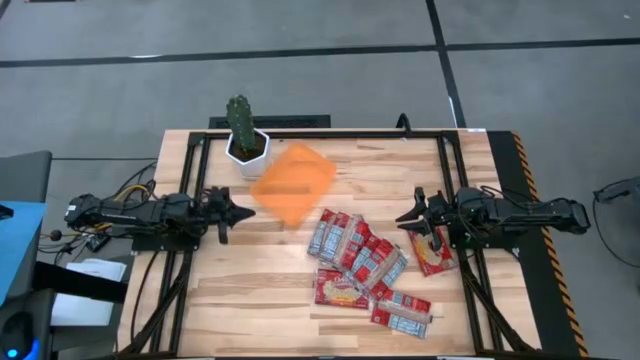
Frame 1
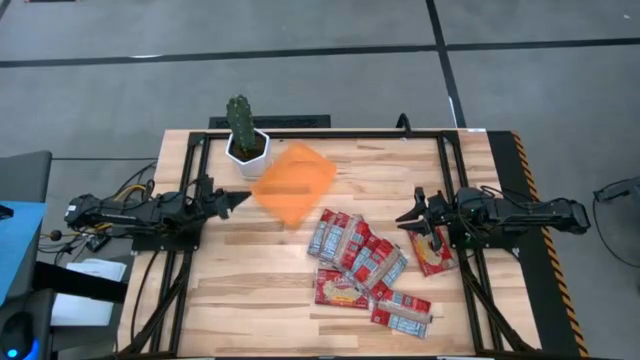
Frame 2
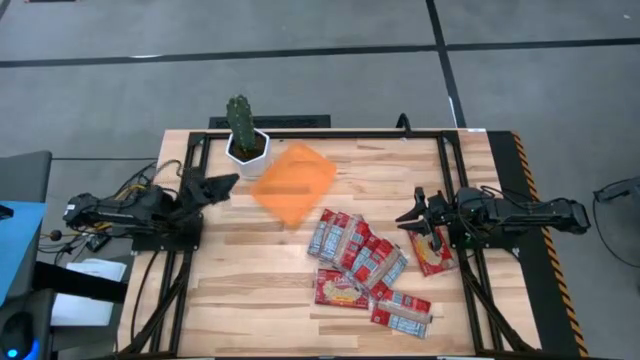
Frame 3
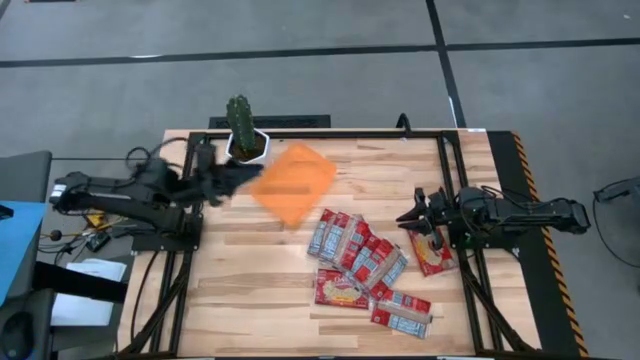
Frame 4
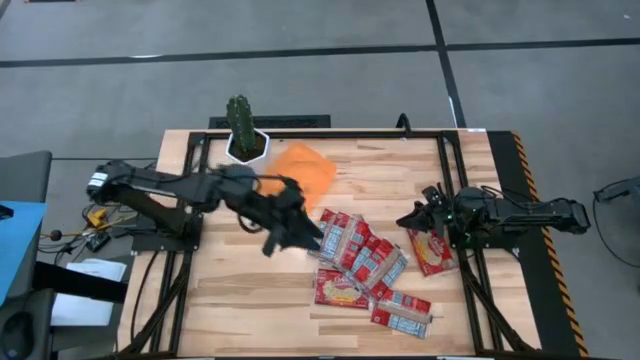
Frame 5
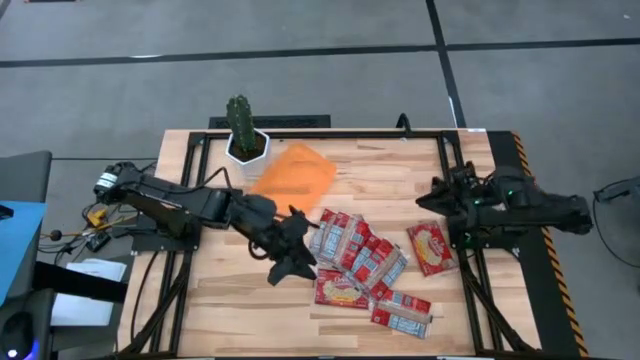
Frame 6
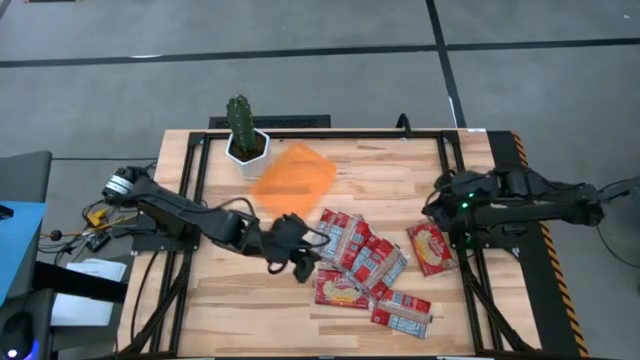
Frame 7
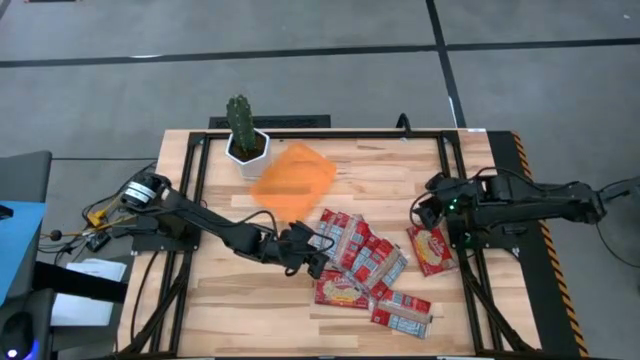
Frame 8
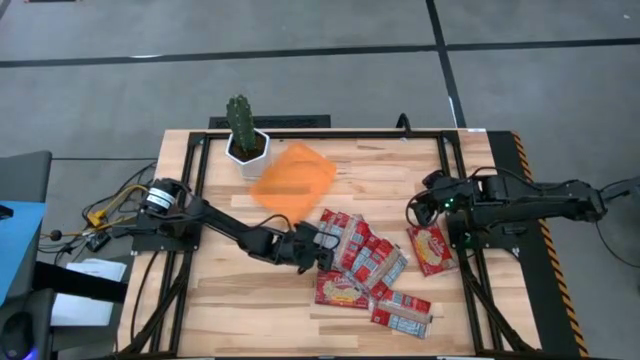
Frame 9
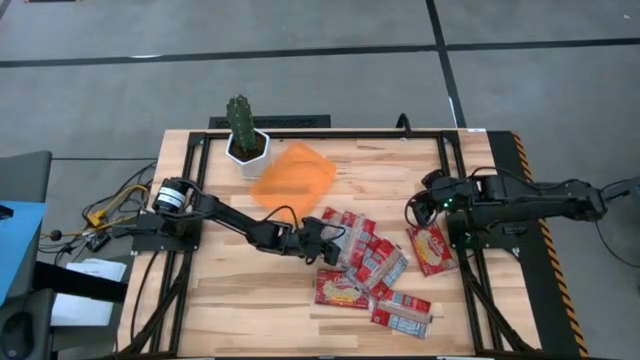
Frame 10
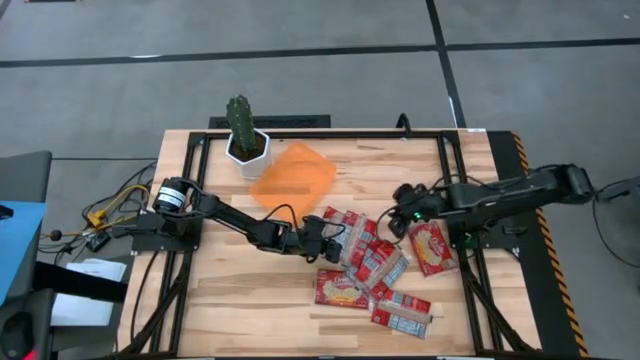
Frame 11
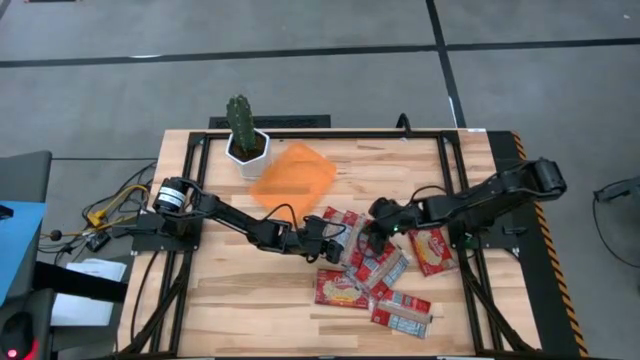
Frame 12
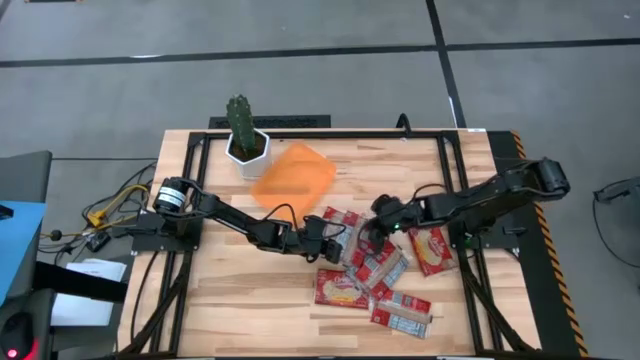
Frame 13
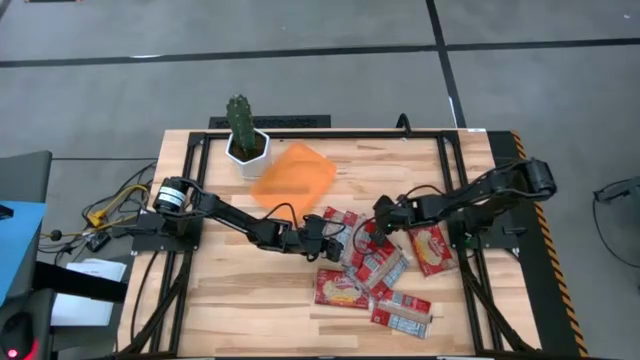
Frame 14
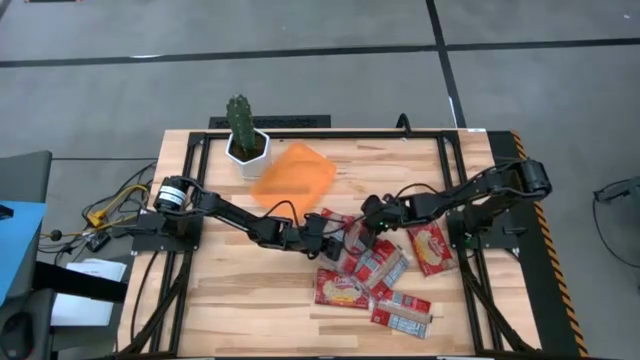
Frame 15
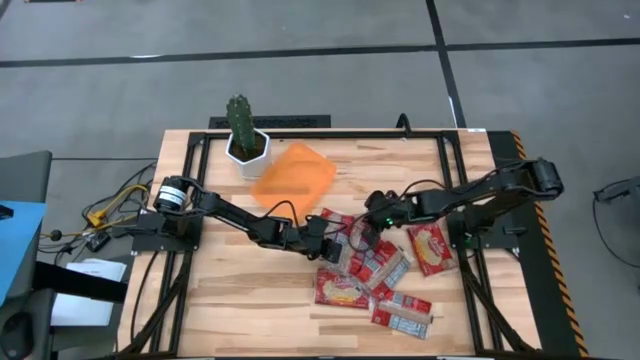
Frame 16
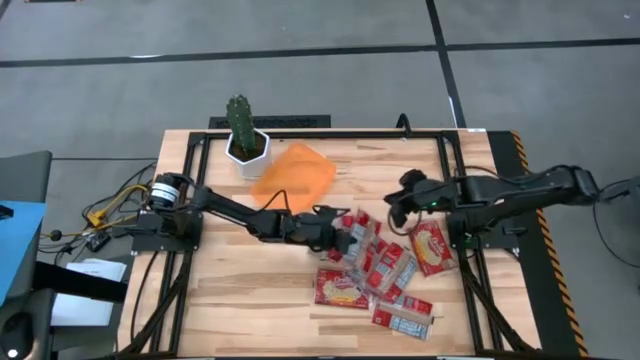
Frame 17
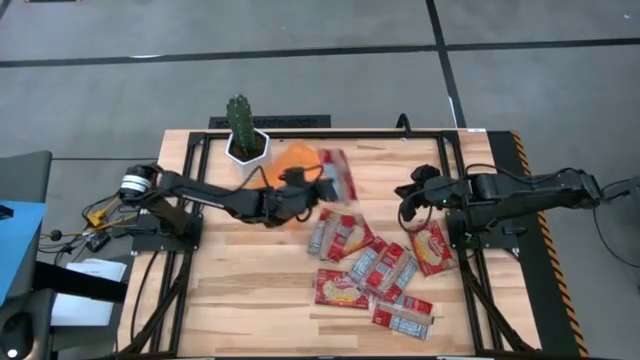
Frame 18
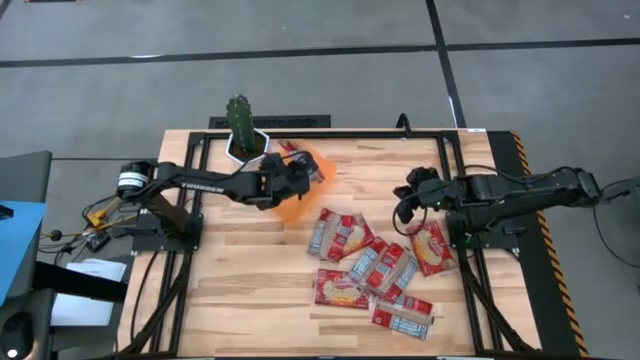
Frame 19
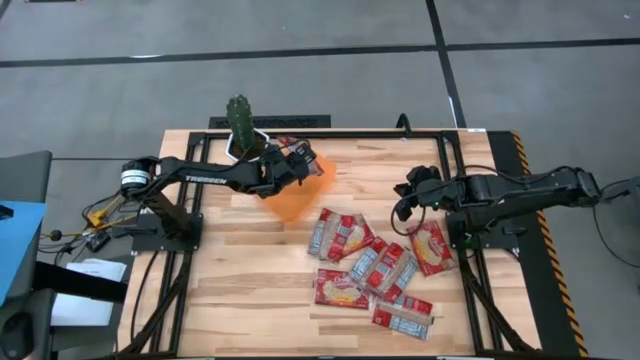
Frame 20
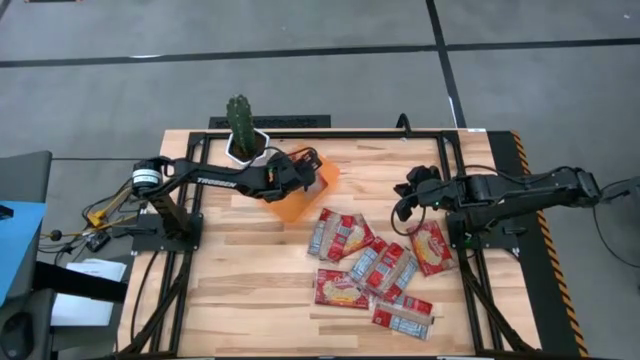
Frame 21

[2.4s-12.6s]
Task: Sort popcorn bags into baskets
Put the popcorn bag into the orange bin

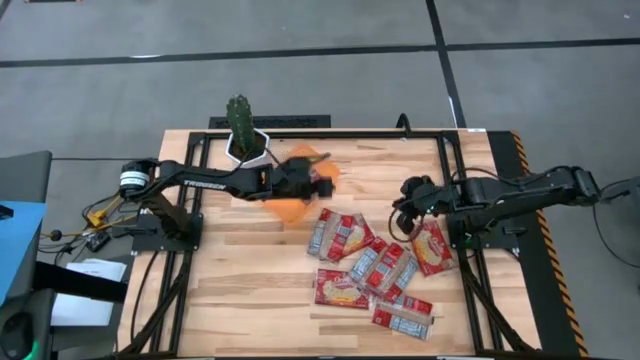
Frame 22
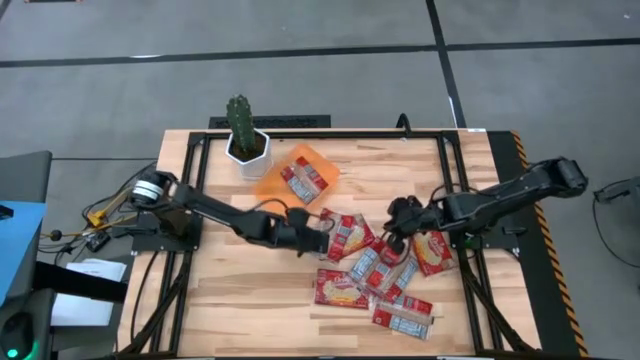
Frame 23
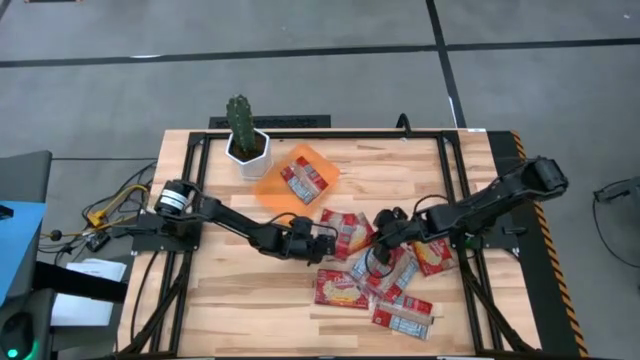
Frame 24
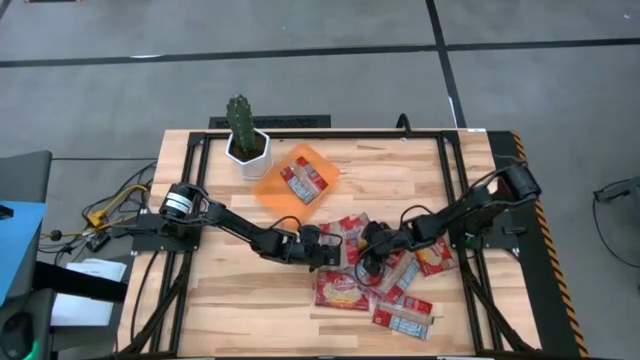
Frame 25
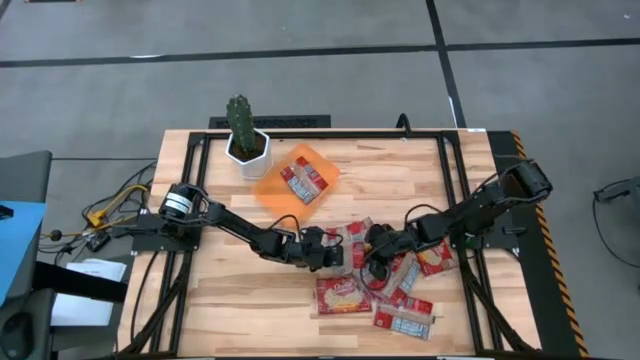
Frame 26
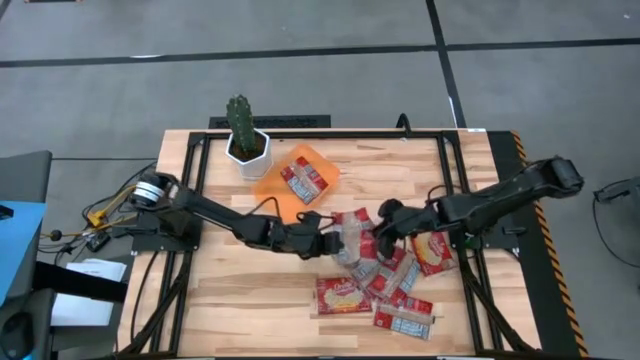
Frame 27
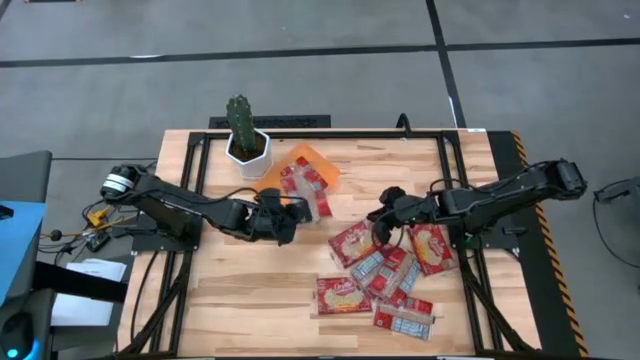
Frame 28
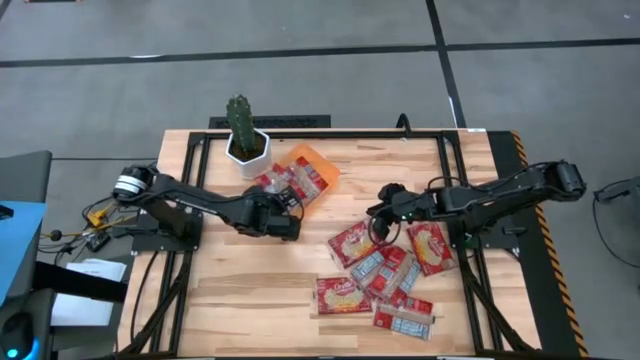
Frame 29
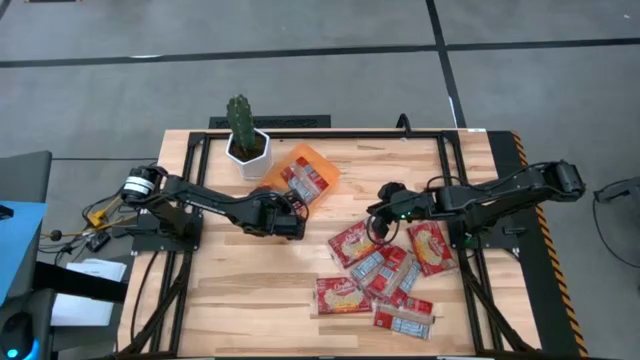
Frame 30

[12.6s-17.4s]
Put the popcorn bag into the orange bin

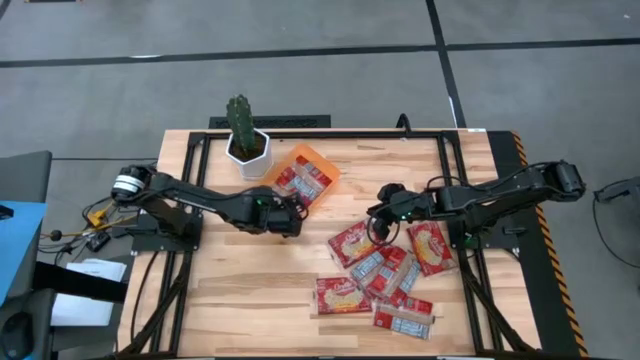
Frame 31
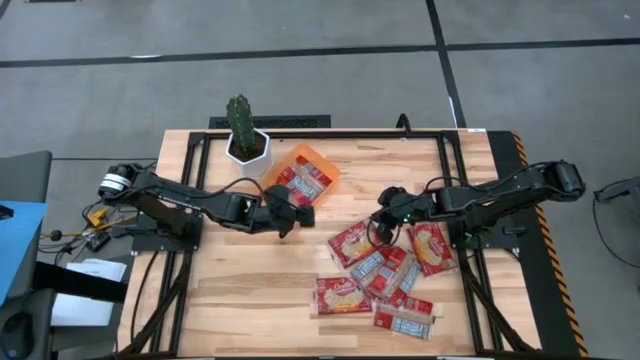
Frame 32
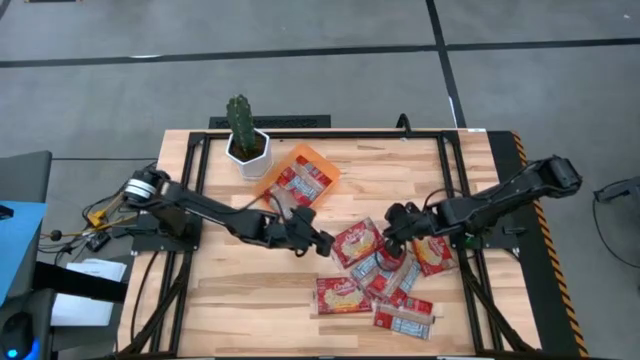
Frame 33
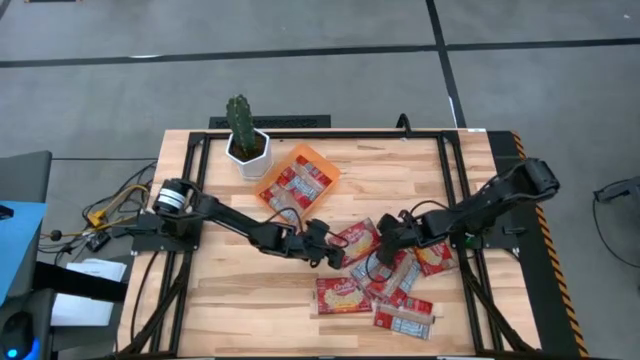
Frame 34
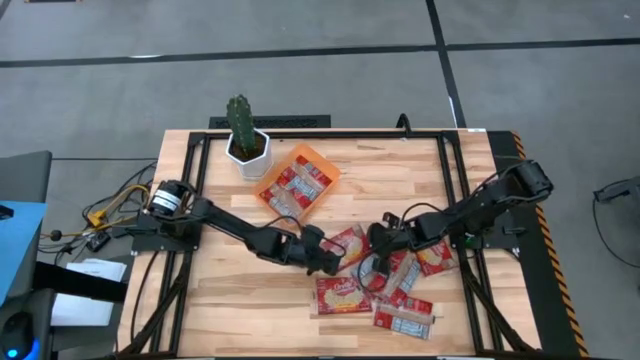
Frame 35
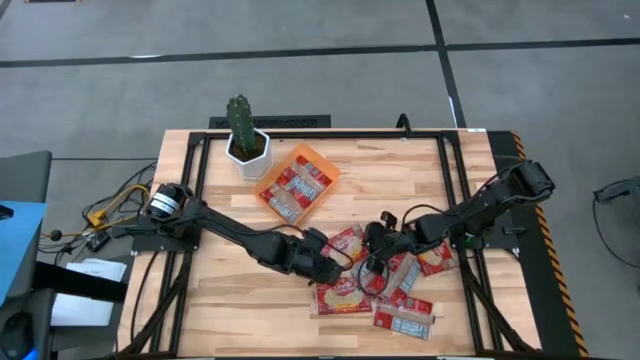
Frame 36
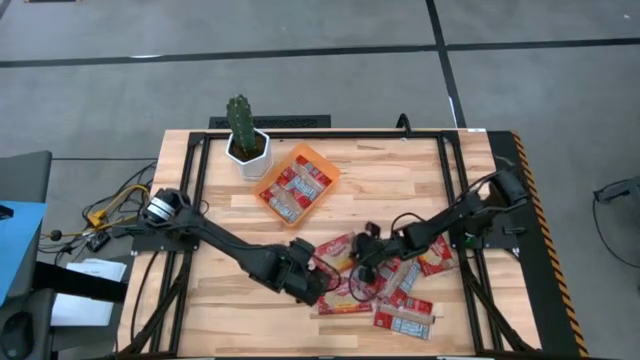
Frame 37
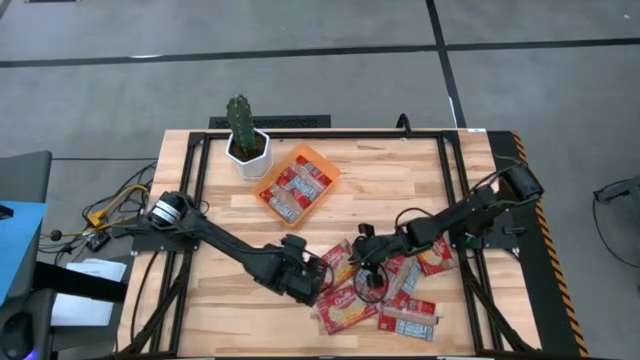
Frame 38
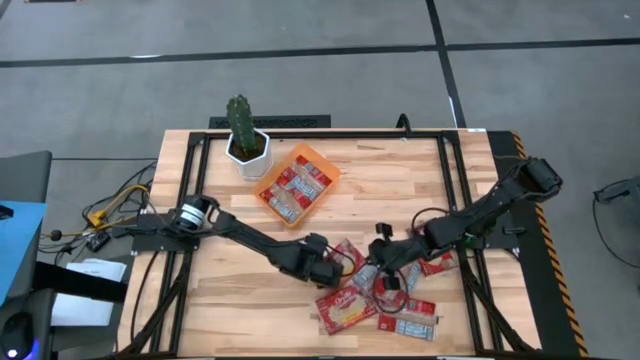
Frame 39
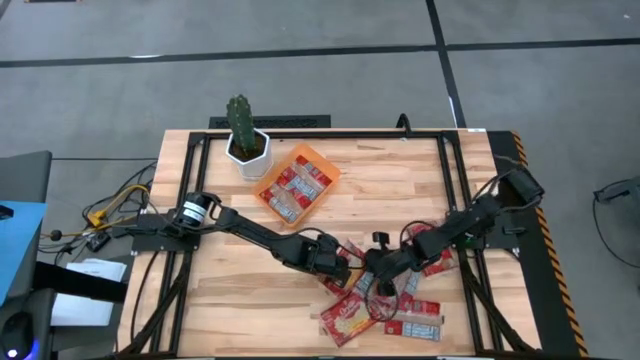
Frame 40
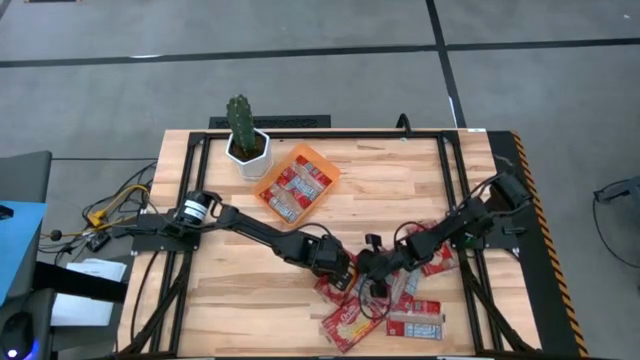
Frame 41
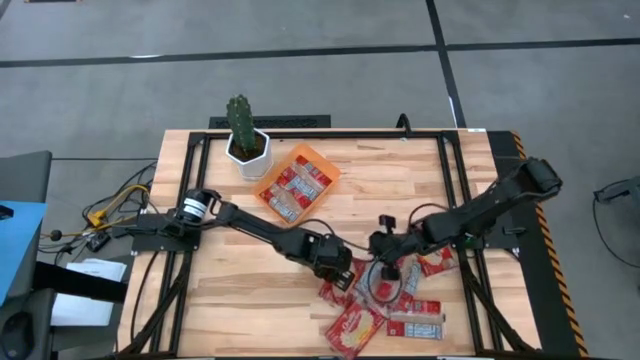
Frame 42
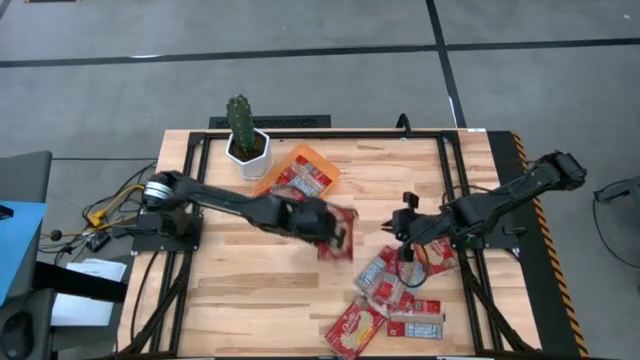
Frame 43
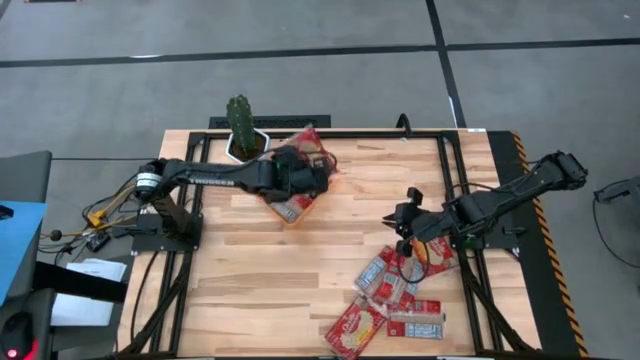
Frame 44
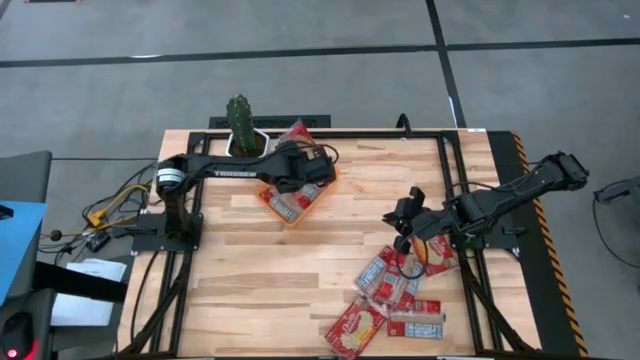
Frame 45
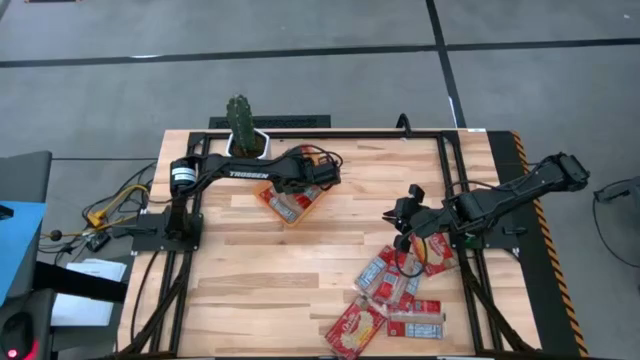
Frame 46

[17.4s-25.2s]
Put the popcorn bag into the orange bin
